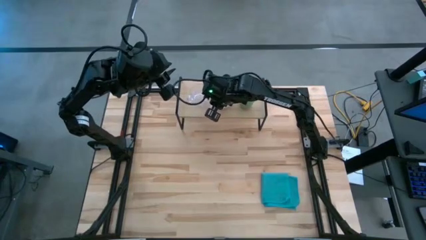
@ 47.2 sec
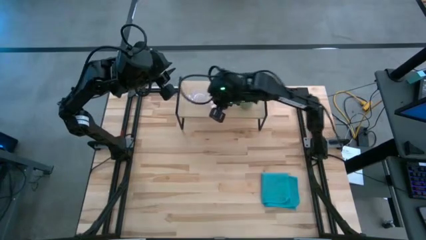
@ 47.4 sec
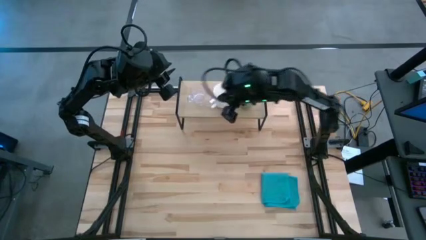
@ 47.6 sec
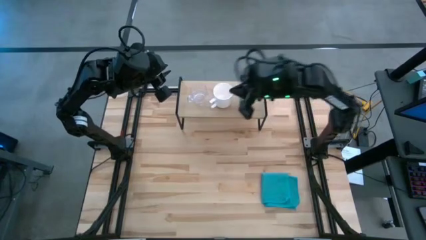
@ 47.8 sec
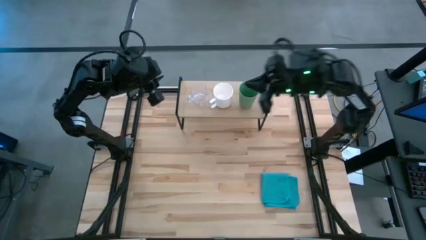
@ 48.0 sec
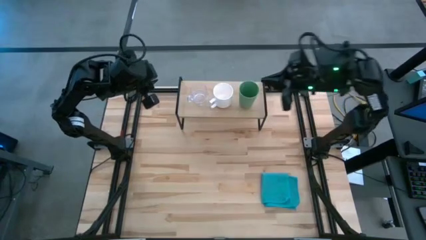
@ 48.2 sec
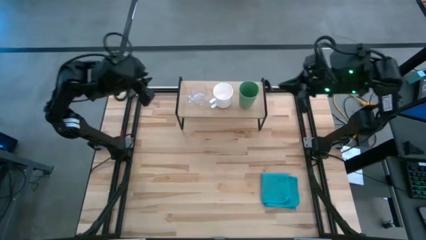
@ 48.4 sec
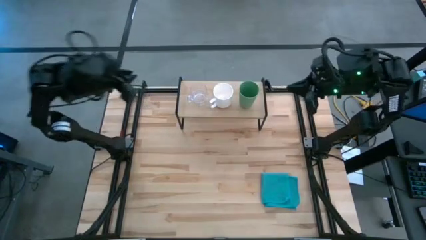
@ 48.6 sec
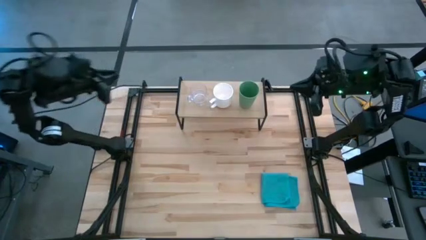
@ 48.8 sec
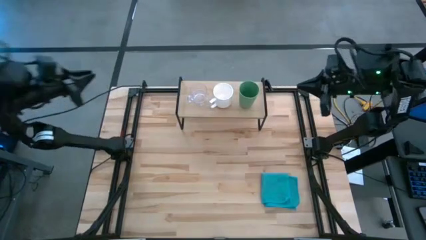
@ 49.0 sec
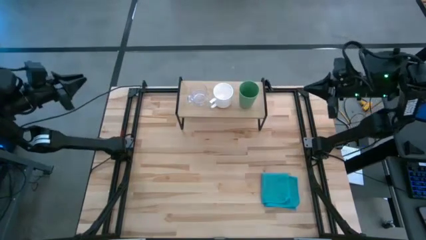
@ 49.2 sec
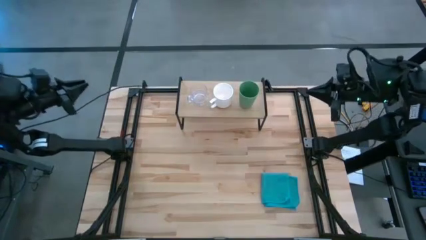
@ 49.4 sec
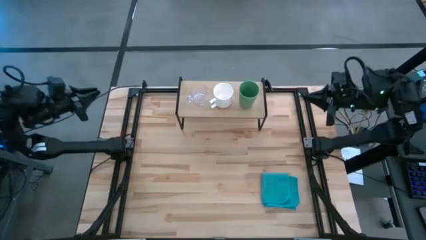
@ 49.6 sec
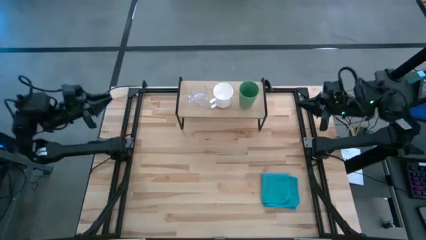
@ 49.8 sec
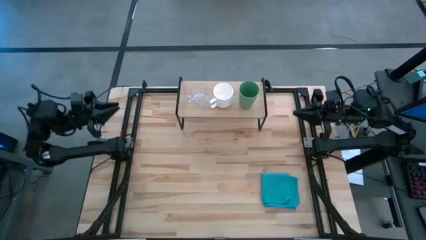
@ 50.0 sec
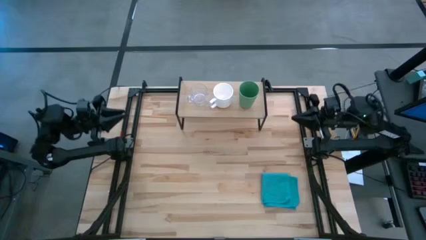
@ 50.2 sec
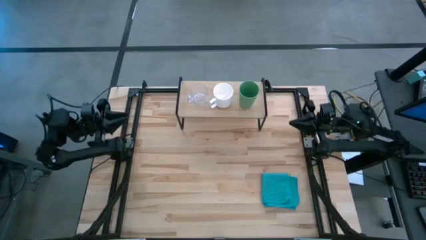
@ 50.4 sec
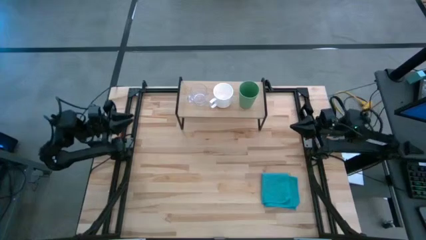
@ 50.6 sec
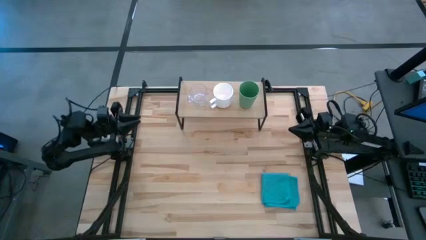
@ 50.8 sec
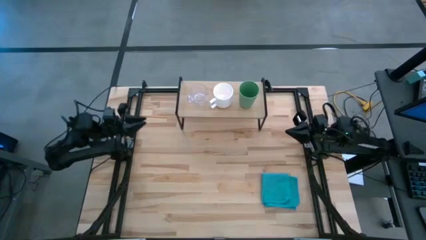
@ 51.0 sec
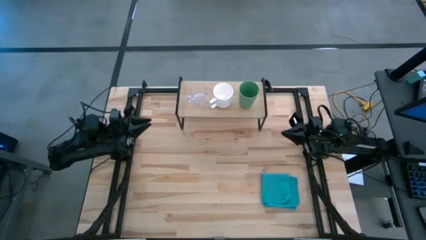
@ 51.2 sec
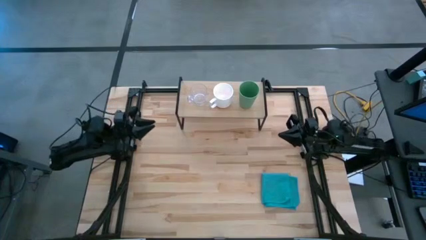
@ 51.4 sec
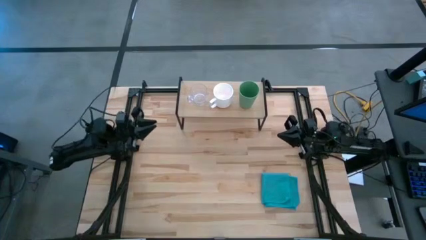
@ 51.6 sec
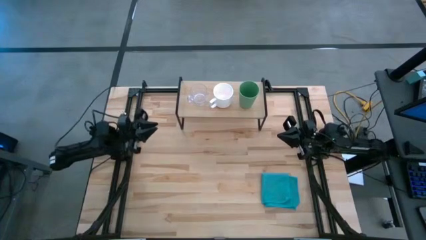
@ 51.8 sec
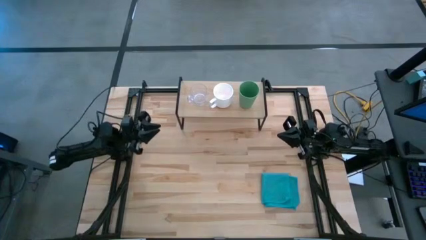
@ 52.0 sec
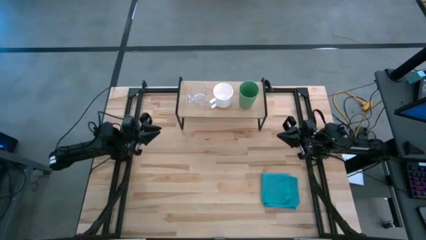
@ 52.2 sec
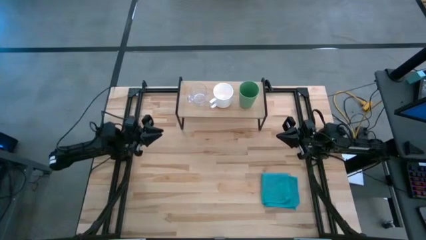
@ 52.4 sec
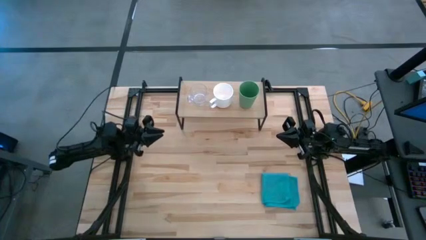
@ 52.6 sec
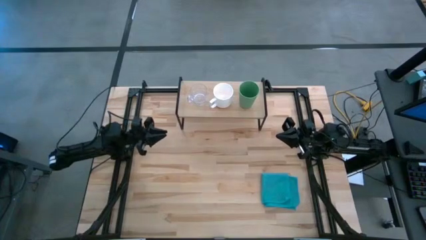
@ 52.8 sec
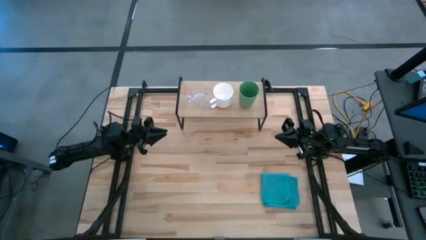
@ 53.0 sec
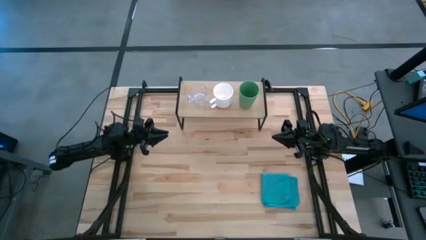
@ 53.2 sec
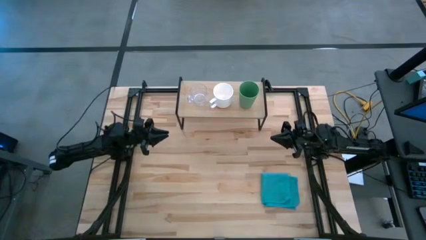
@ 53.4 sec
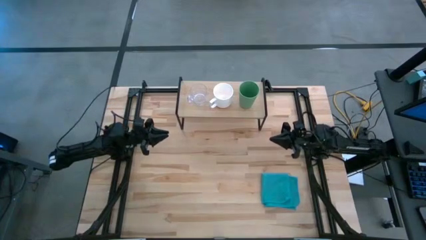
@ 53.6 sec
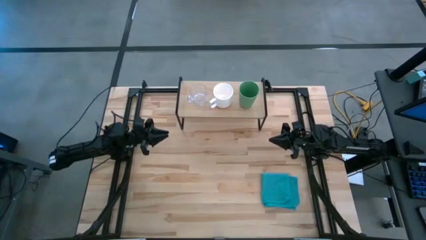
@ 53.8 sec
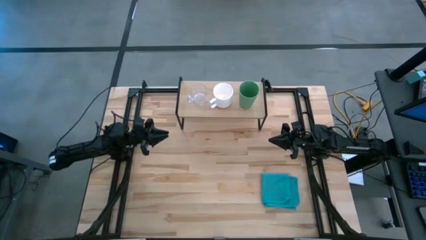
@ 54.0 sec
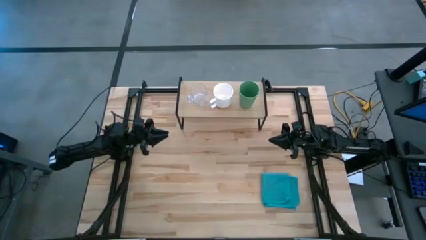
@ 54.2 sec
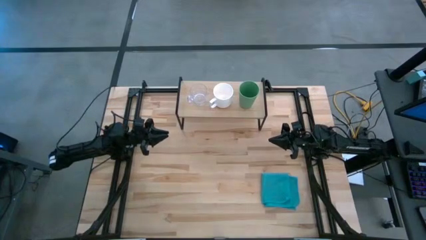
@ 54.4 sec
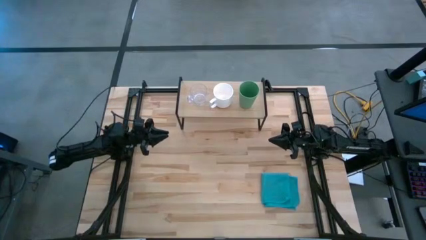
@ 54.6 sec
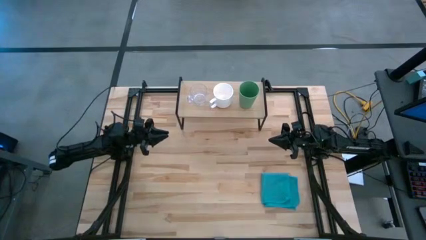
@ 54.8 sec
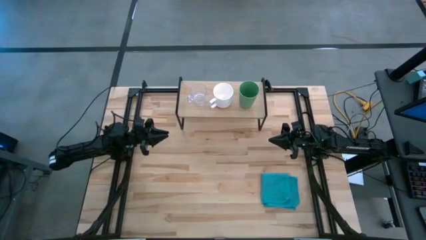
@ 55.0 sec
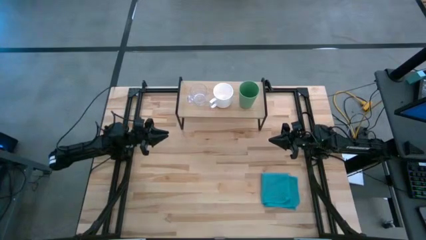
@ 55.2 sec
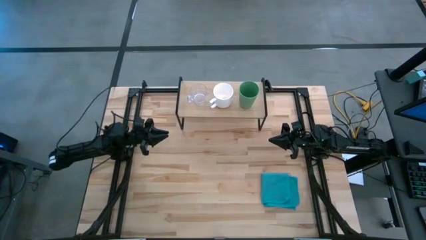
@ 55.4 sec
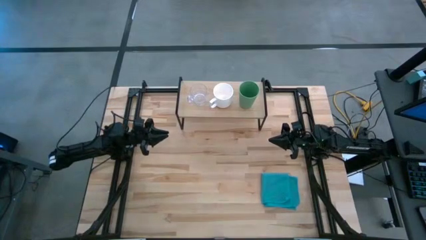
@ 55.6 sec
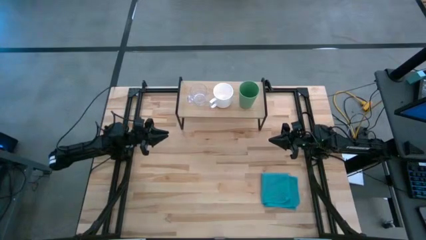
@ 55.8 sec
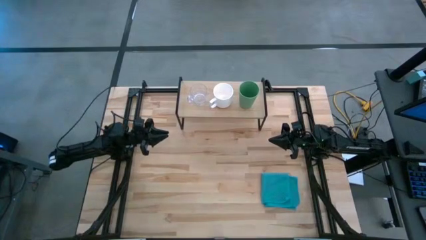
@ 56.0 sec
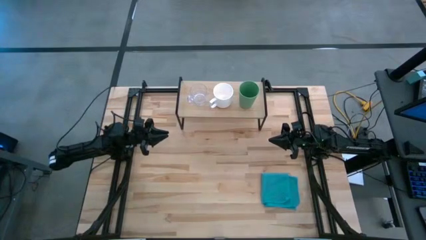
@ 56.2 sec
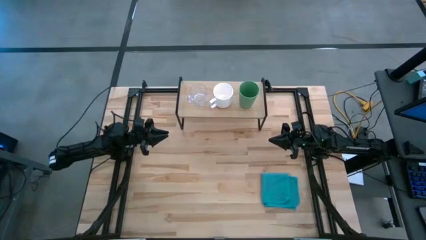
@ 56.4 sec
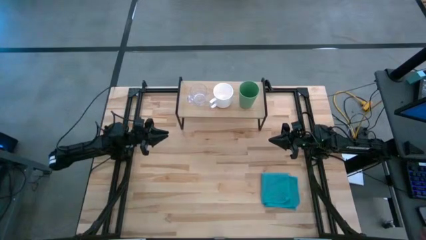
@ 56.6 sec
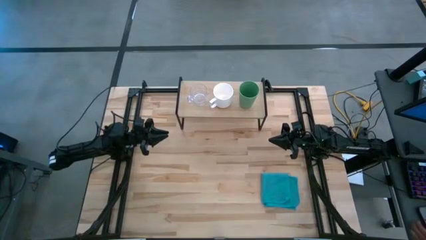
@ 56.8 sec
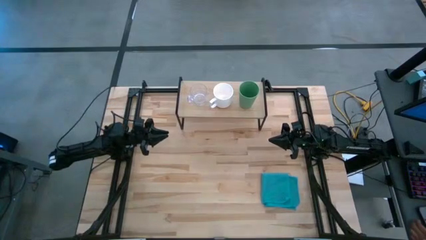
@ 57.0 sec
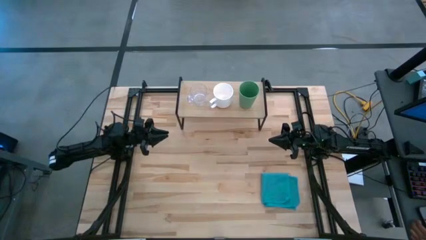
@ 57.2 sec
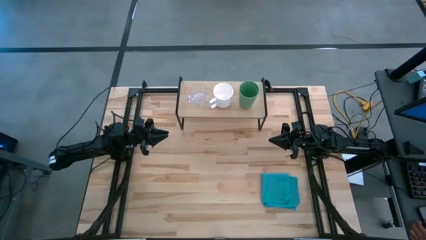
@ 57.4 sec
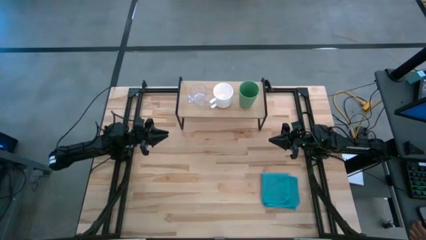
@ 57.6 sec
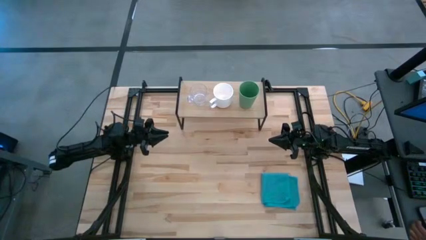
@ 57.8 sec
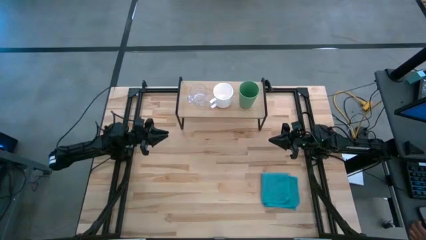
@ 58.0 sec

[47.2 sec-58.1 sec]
Task: Stack small to large cups/mugs on shelf
Return to Home Position

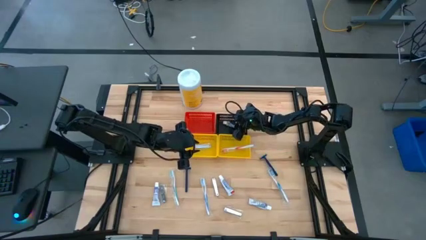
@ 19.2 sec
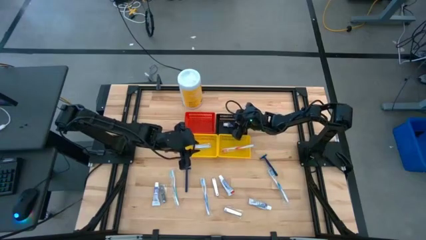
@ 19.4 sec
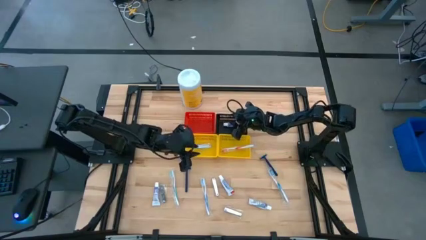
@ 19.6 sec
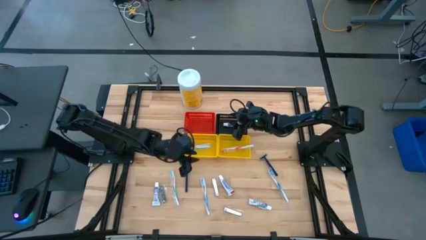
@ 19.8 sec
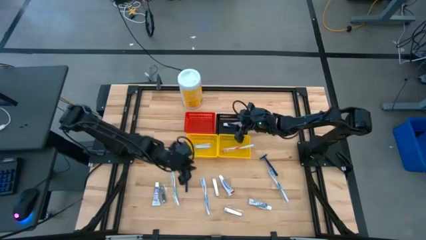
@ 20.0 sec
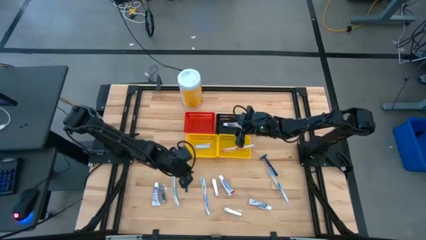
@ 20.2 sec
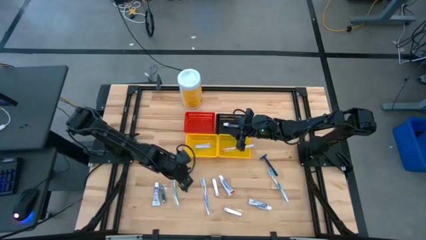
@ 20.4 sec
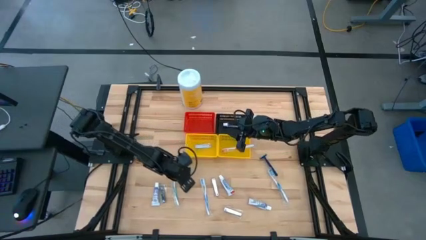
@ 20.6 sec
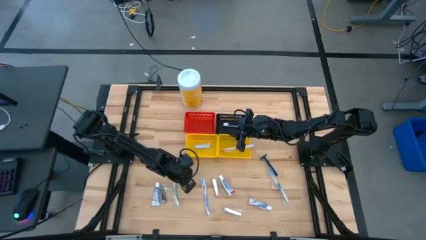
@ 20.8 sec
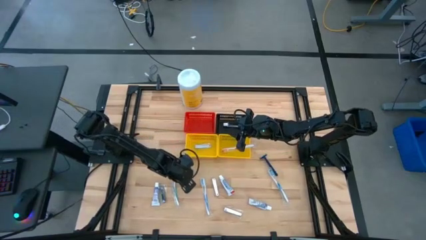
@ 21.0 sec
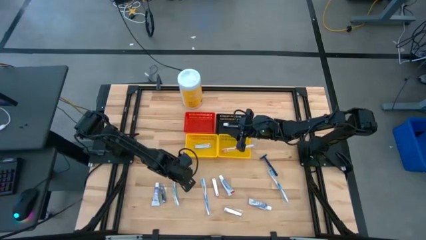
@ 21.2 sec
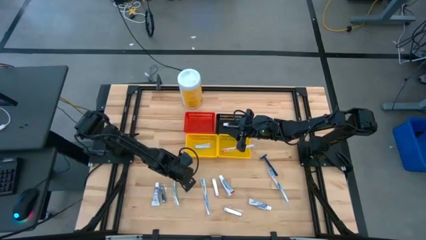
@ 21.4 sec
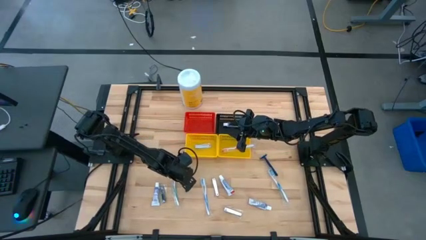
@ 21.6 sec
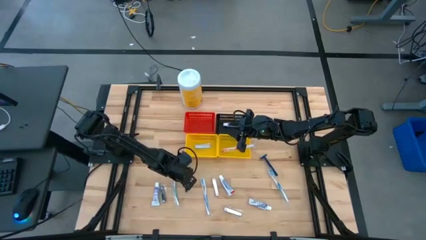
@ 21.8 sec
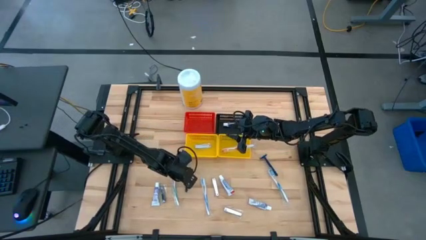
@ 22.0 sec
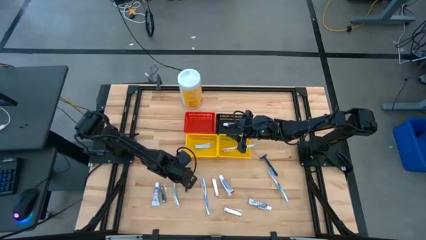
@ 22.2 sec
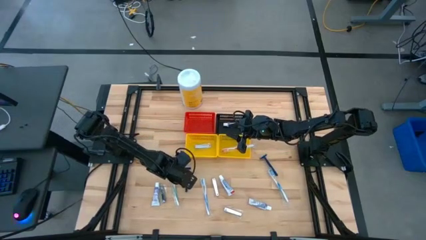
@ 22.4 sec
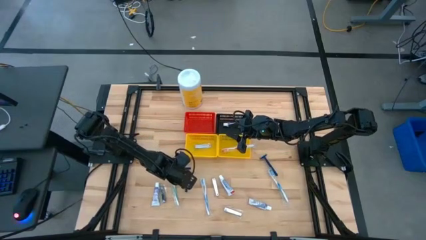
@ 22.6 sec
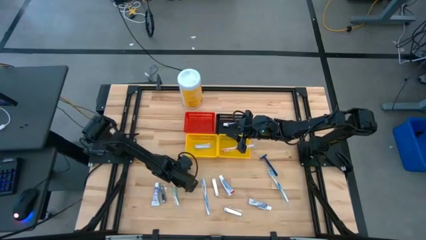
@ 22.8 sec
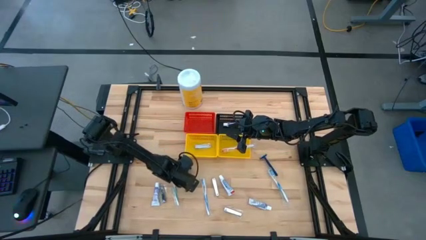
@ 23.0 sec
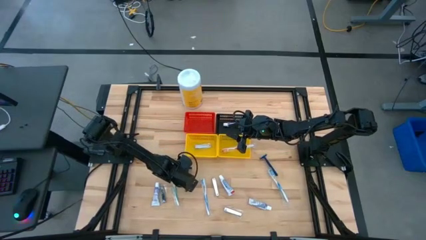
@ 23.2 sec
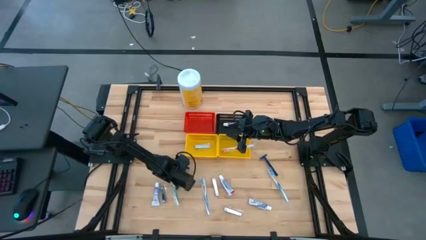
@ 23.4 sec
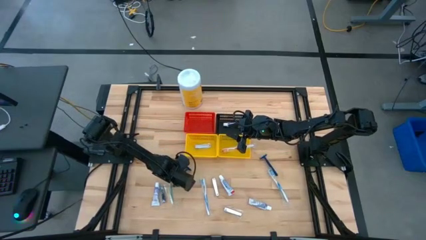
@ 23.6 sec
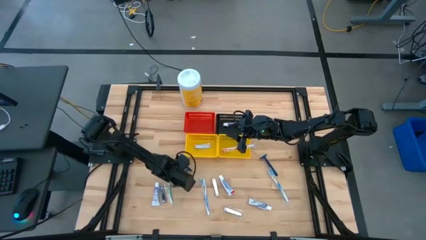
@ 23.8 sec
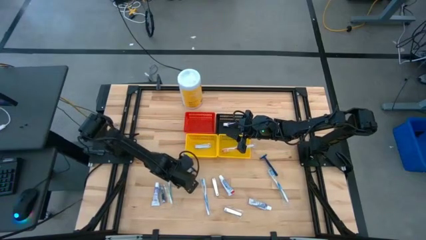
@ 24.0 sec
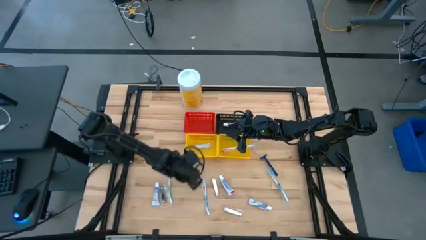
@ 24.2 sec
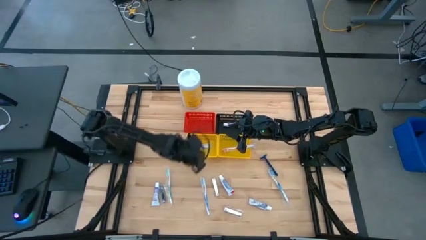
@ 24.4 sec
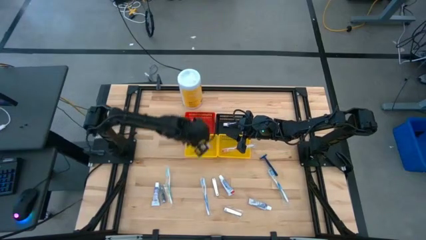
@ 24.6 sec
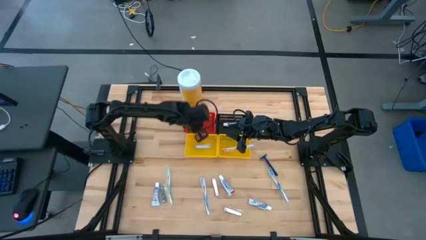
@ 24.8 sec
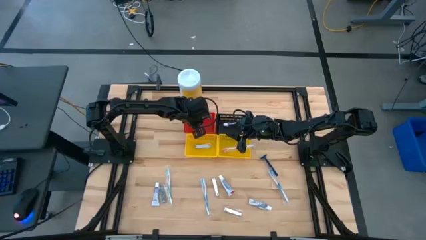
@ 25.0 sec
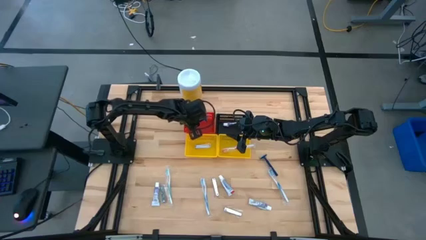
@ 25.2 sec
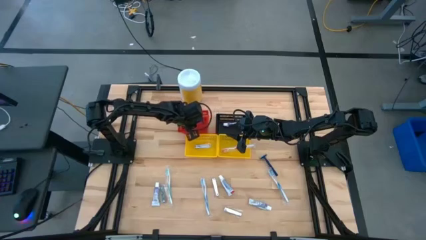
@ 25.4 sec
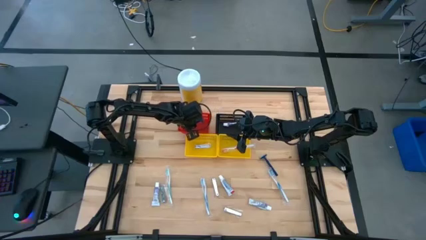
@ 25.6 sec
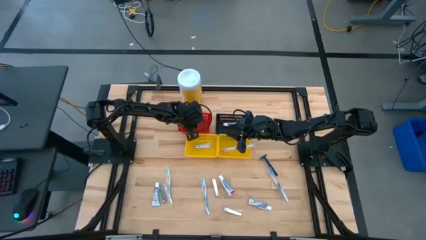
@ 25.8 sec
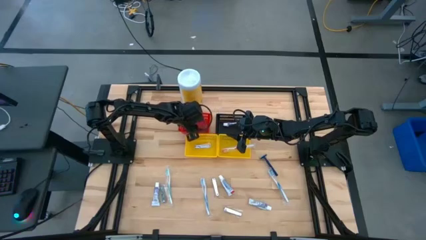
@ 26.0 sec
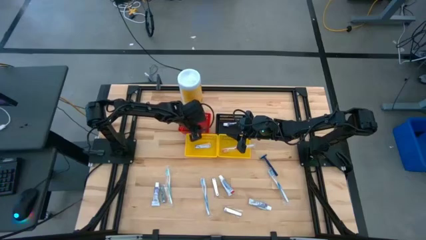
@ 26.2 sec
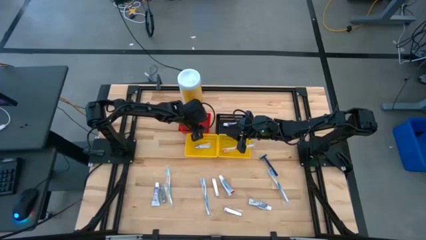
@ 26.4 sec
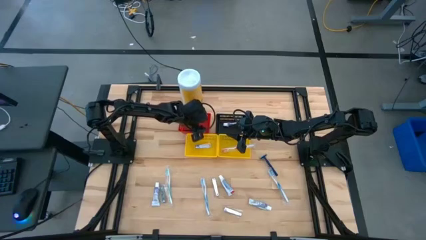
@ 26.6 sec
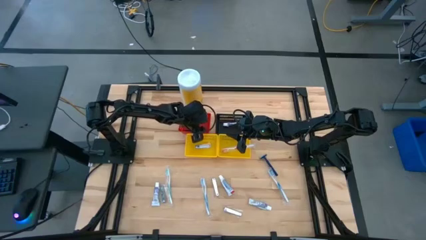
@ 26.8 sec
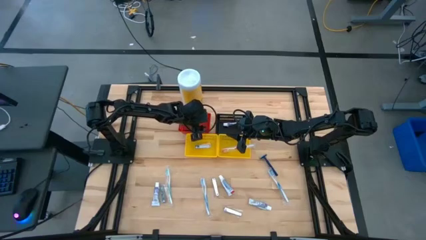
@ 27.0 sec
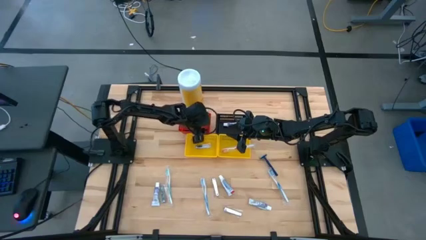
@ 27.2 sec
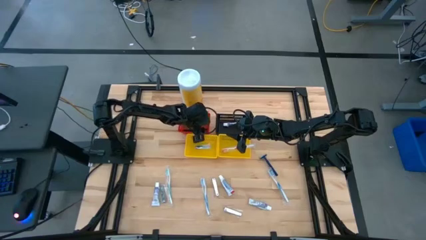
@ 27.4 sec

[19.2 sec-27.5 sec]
Task: Pick & Place Travel size toiletries
Put the blue razor into the red bin
